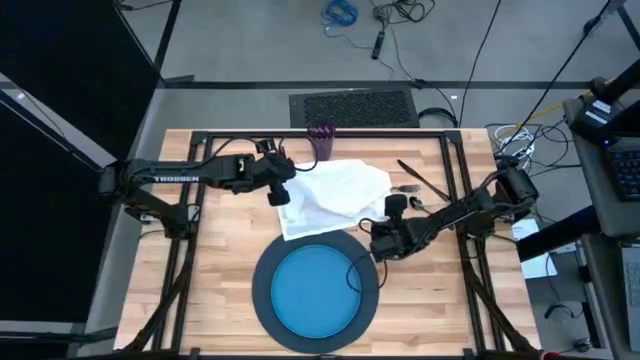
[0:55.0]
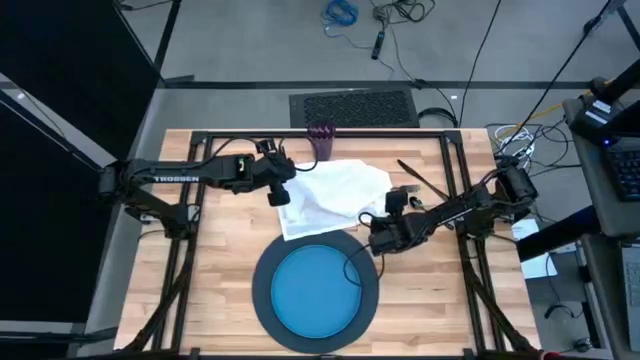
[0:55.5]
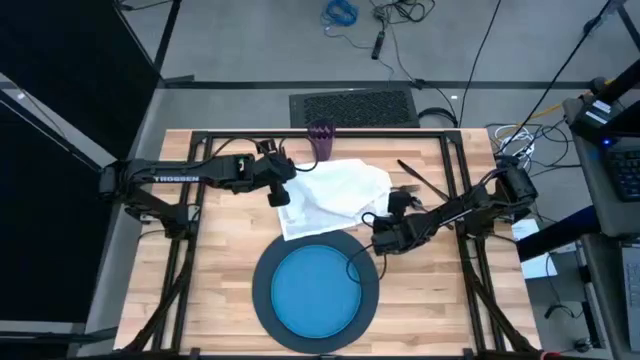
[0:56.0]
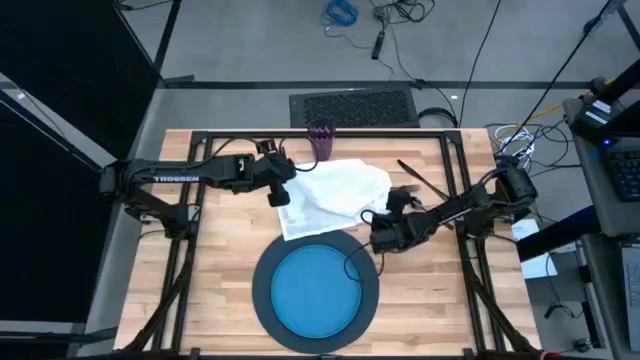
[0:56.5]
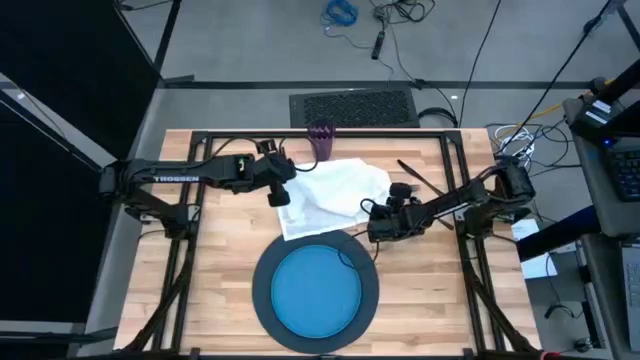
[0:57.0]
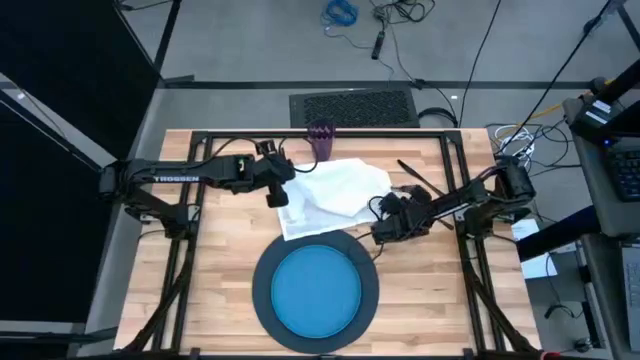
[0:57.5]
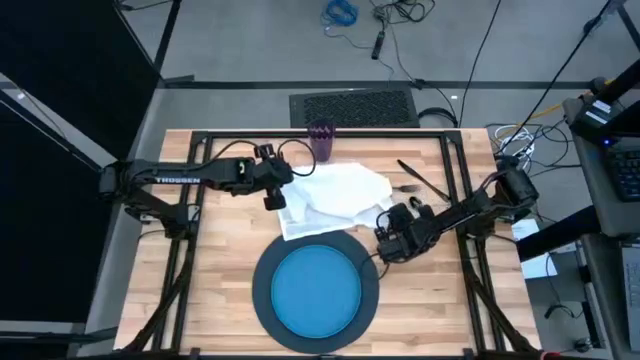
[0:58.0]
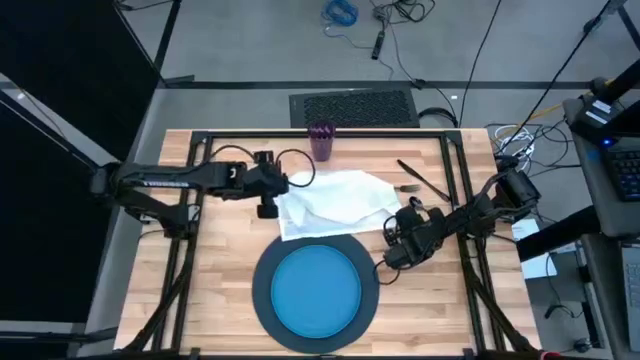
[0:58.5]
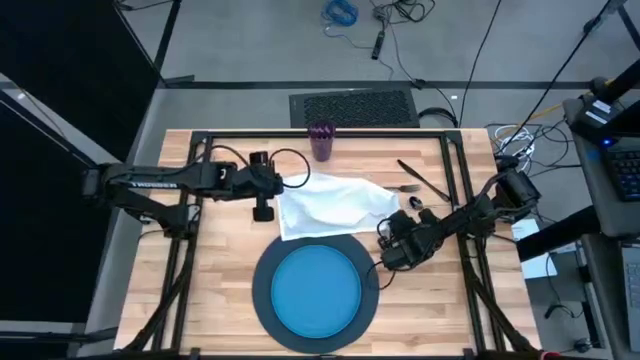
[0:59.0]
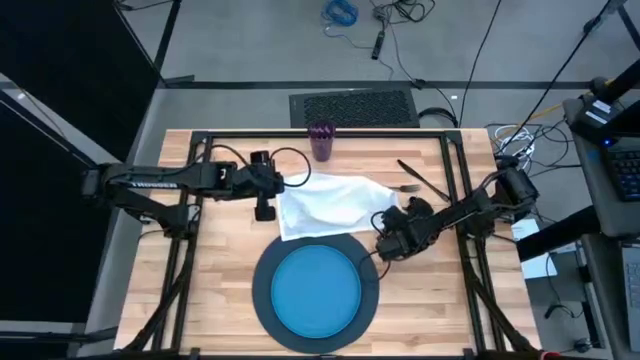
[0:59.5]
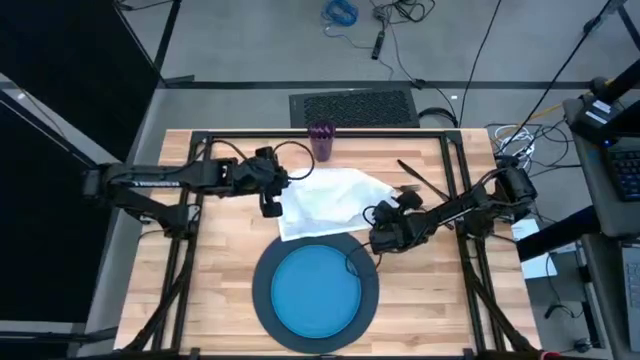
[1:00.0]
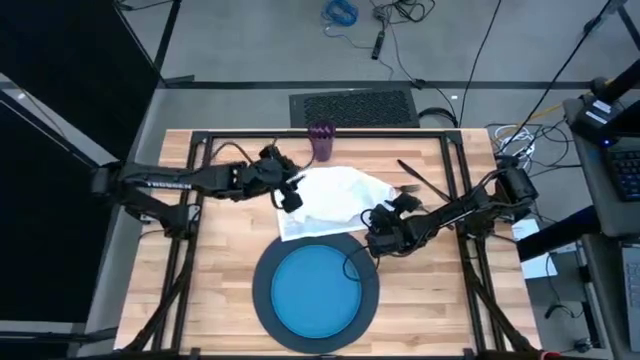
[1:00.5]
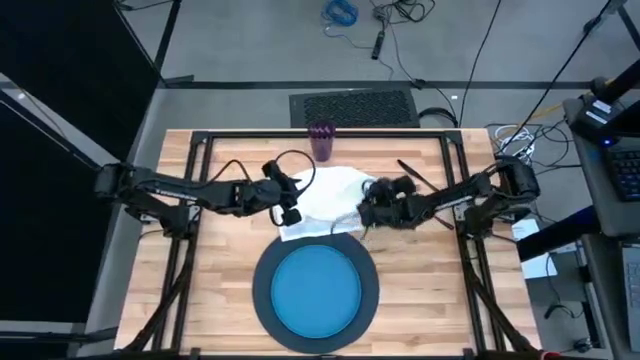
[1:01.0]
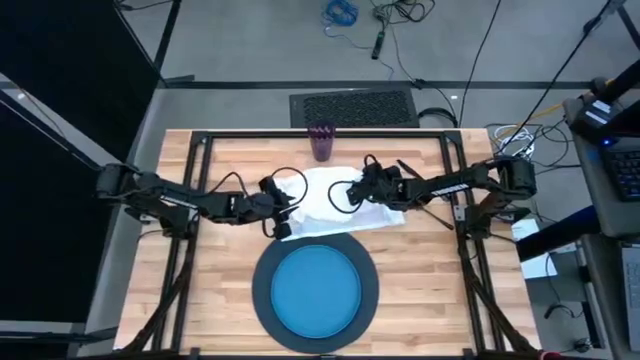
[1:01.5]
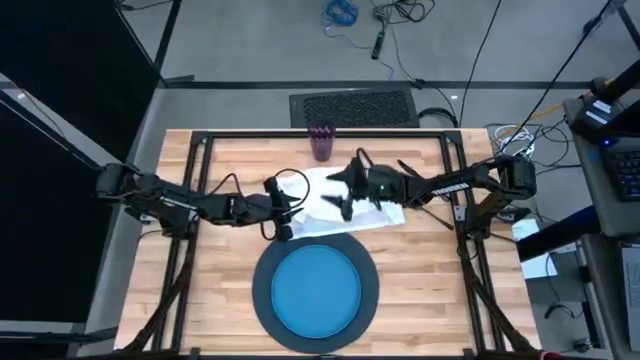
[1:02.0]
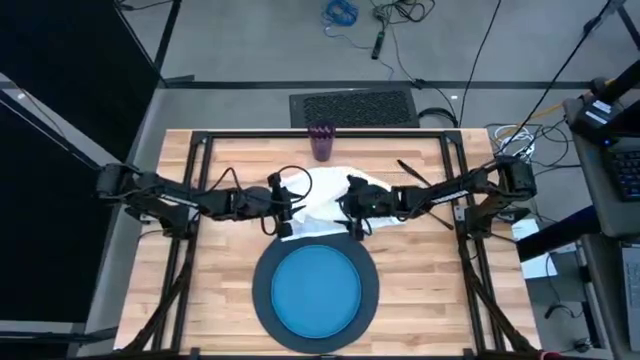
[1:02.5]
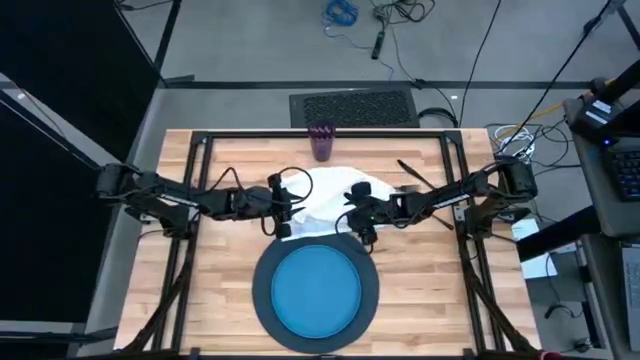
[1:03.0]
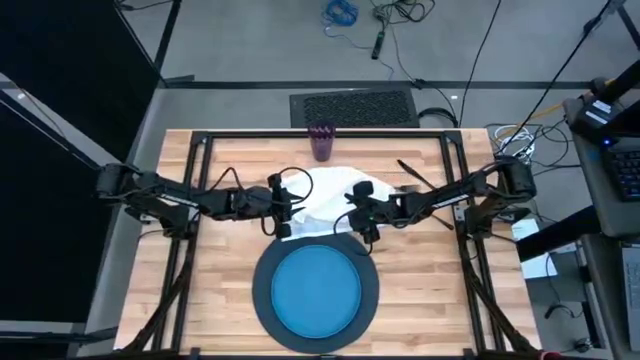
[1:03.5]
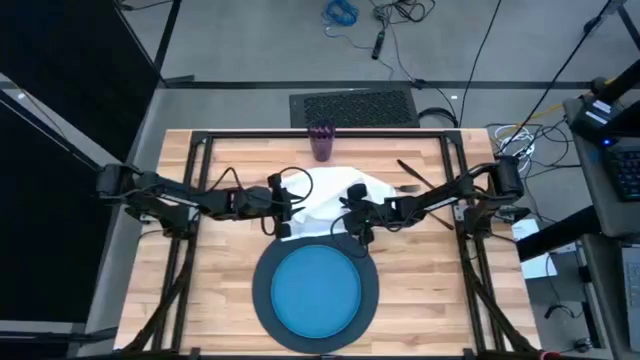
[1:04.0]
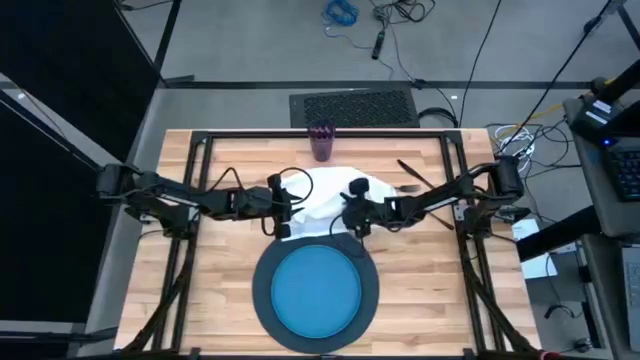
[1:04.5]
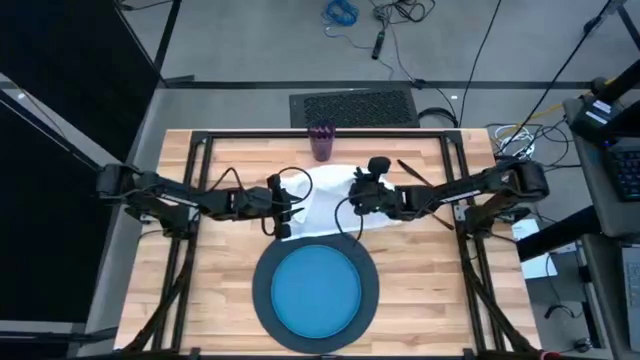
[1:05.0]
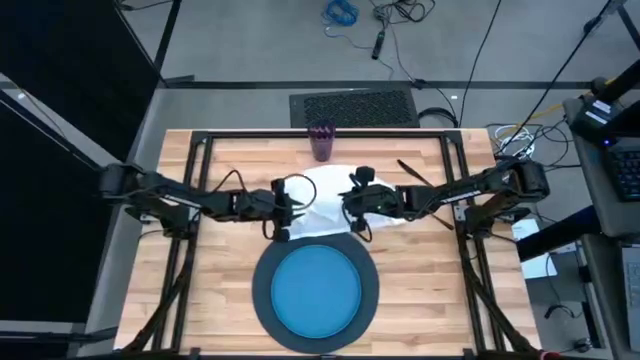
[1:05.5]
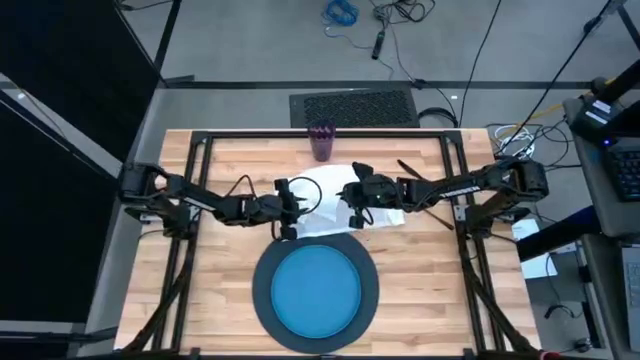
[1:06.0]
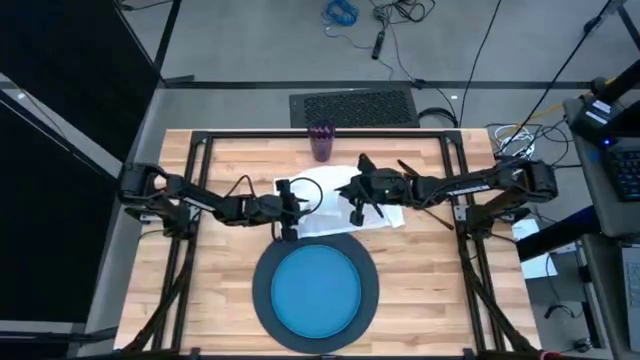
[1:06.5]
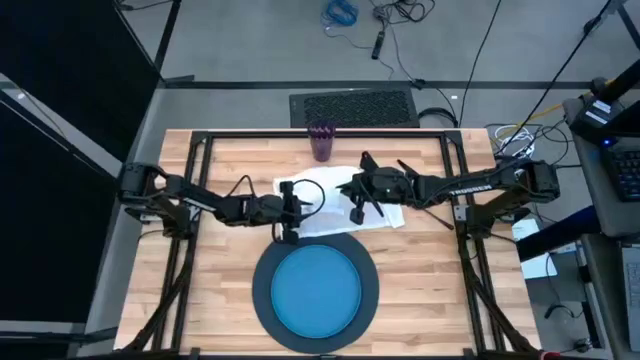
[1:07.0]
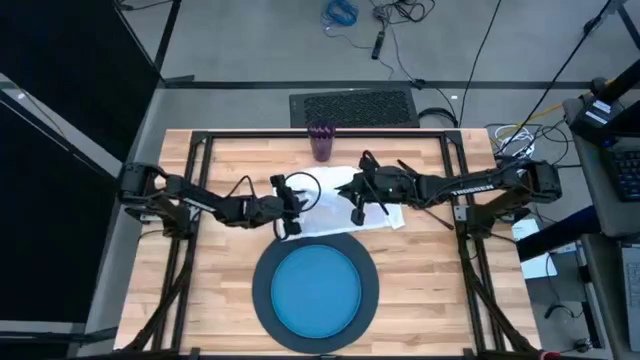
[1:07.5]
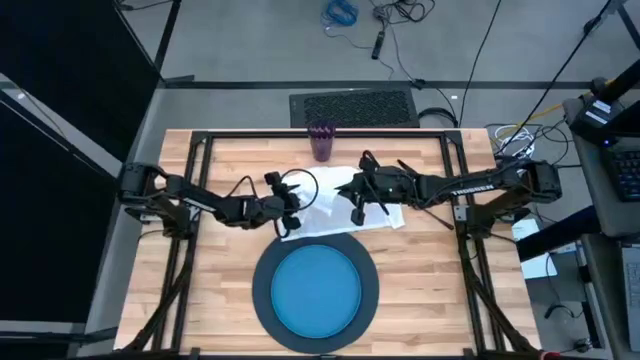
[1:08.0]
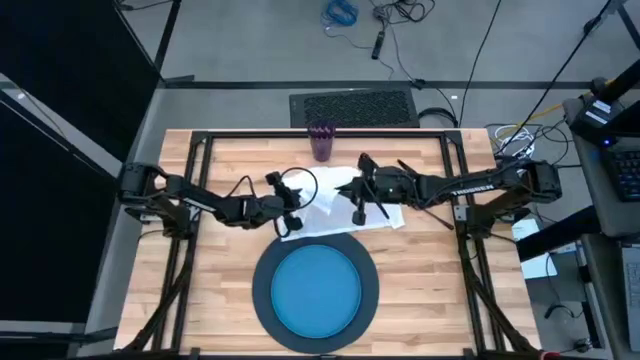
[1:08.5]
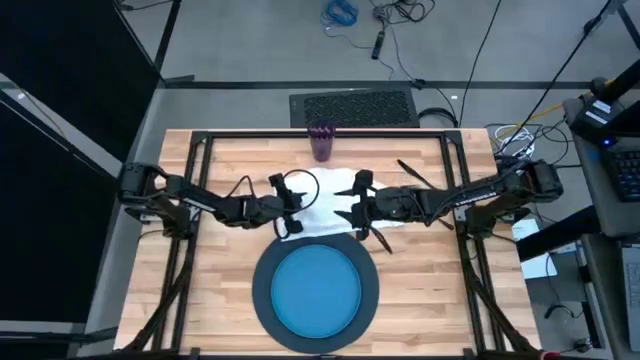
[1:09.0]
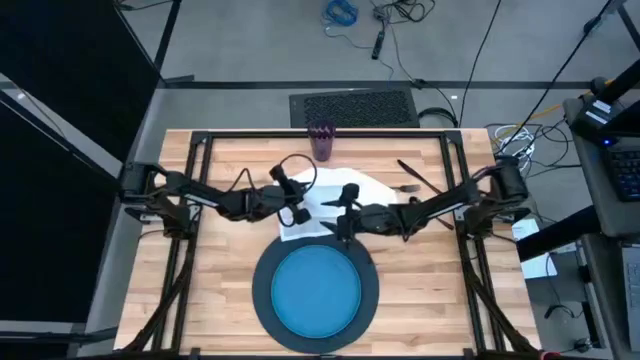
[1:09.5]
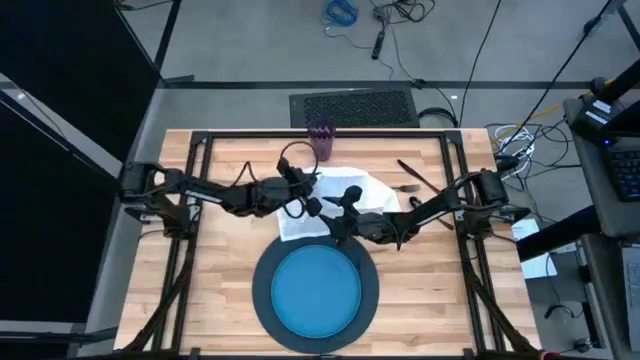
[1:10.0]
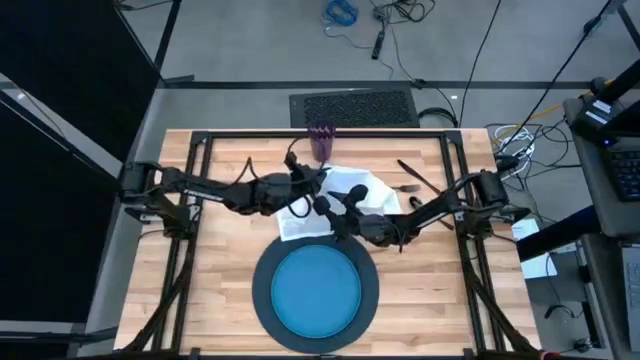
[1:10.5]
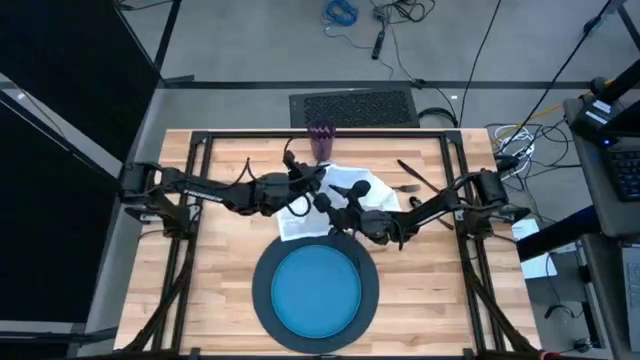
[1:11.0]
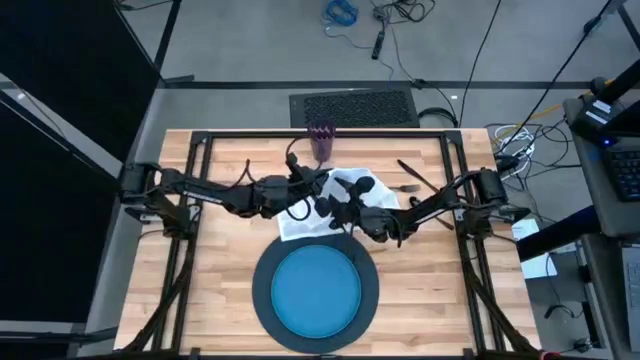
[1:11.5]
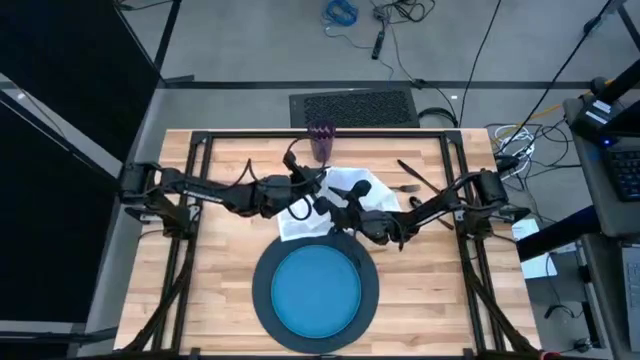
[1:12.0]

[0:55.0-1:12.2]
Task: Set table place
Fold the white table napkin on the table
